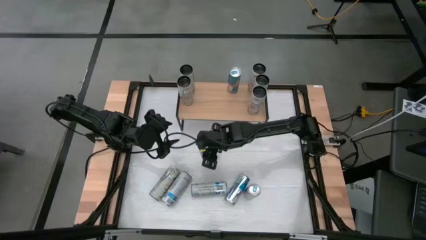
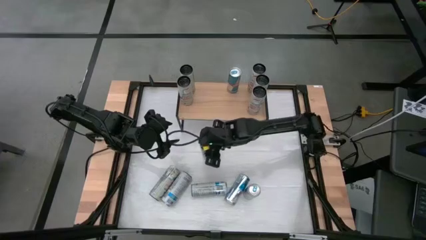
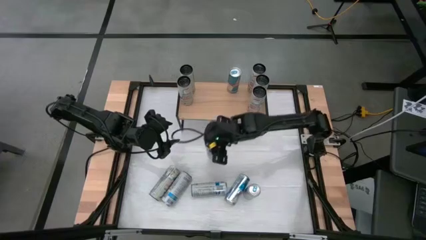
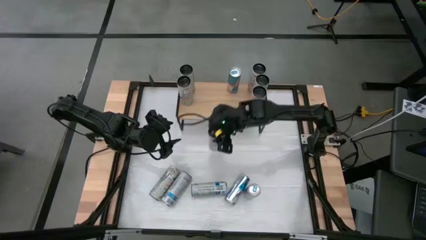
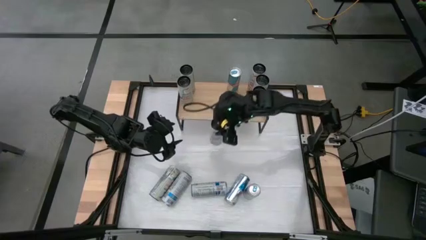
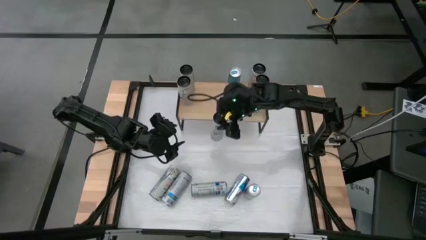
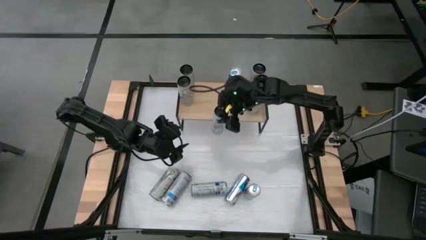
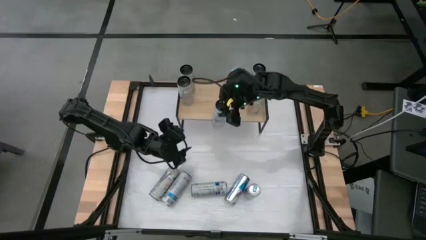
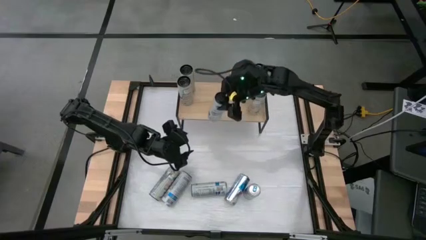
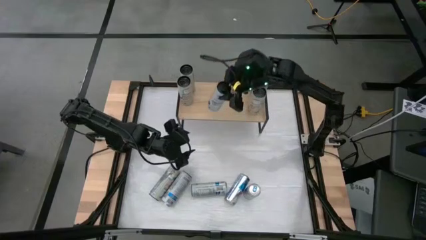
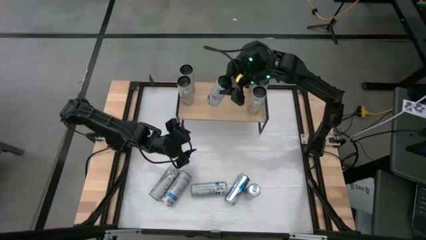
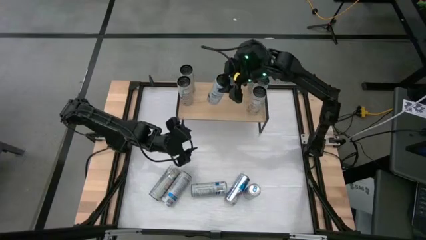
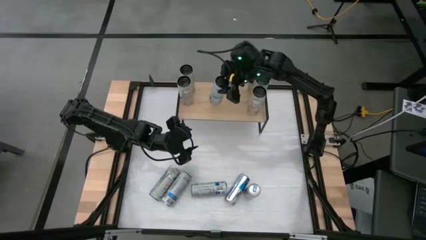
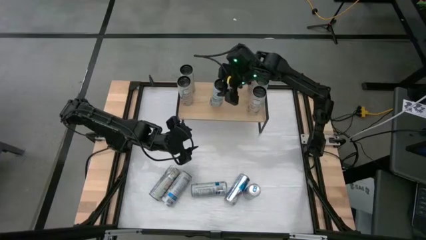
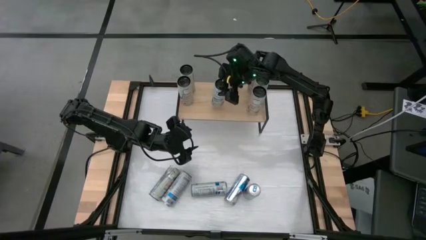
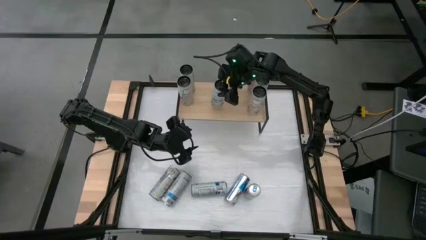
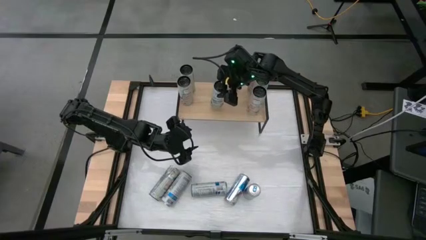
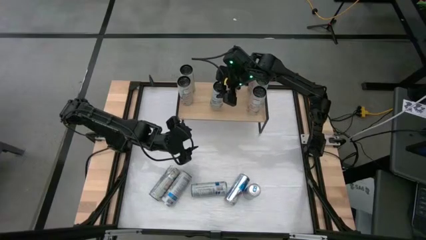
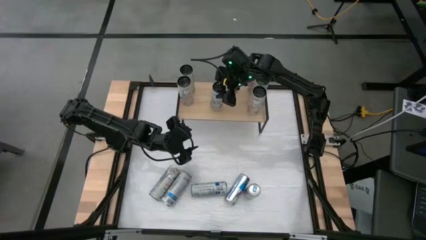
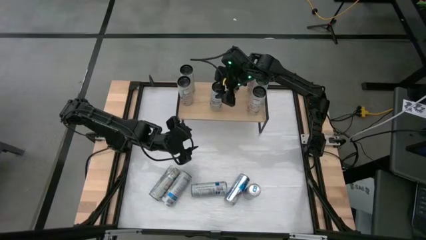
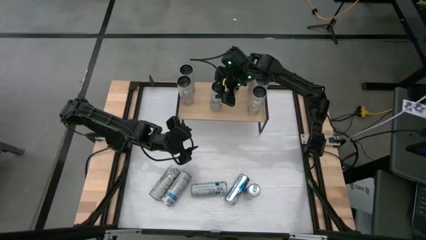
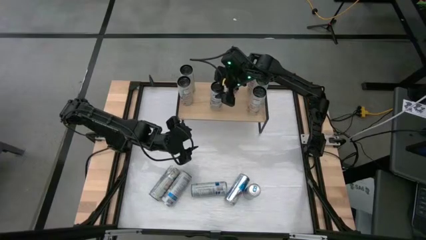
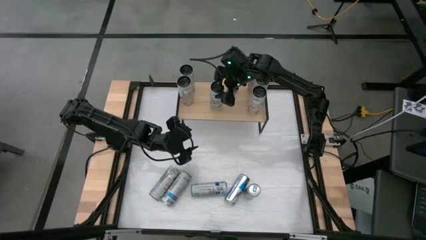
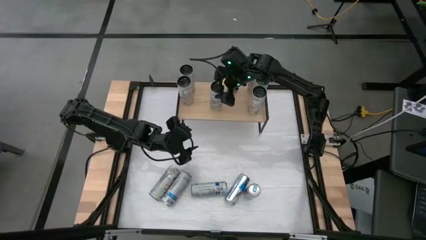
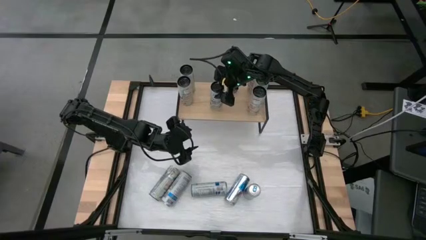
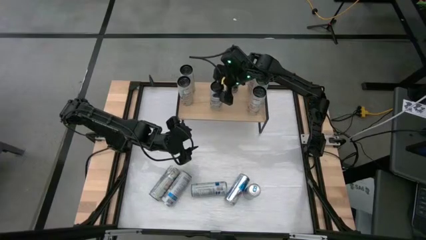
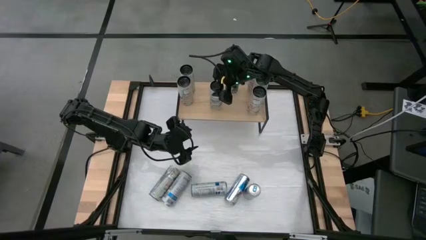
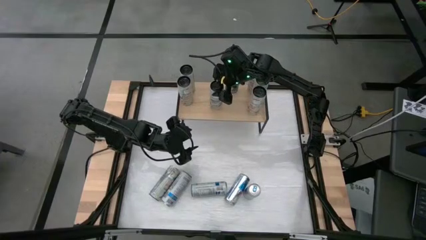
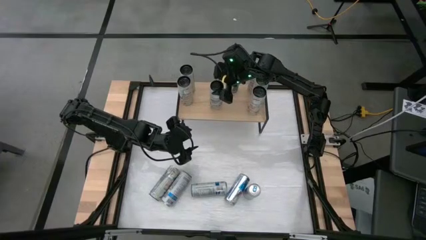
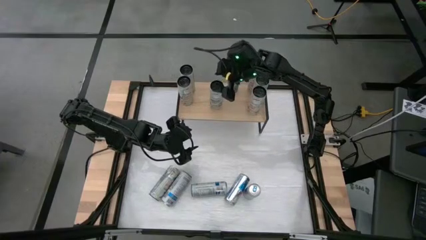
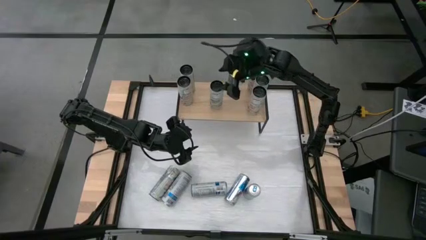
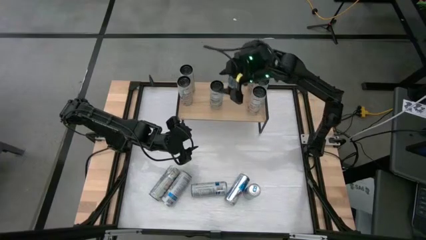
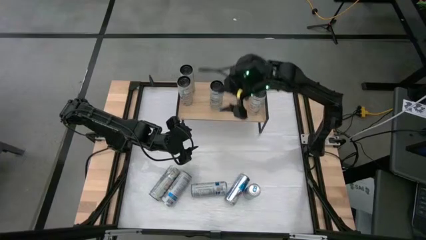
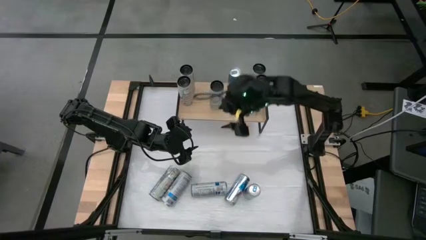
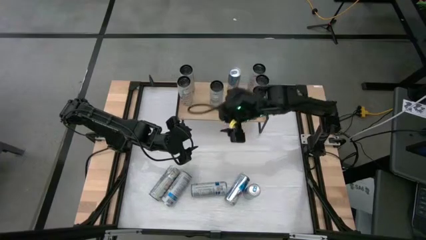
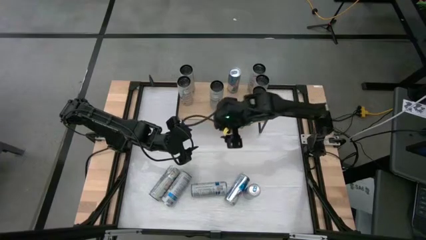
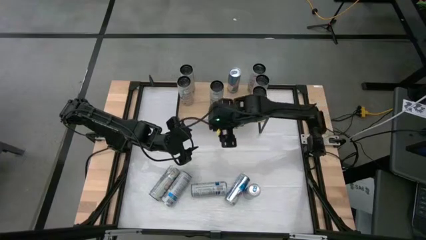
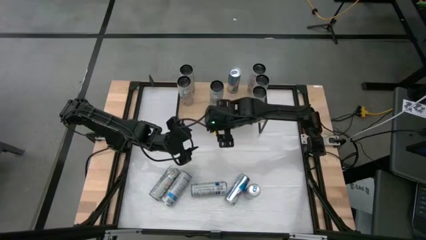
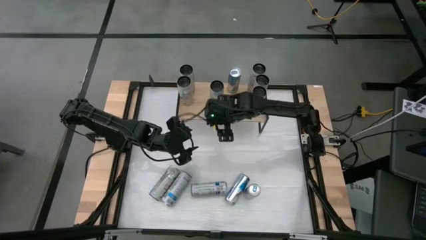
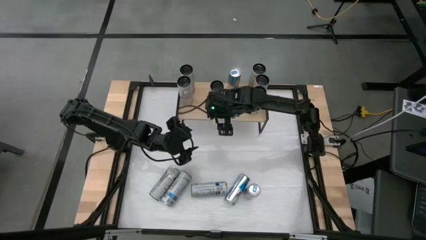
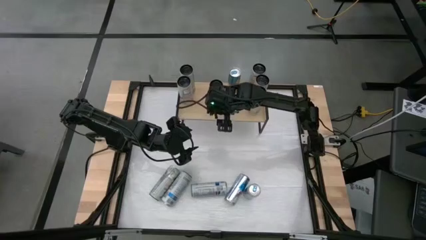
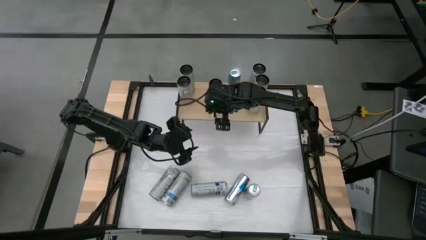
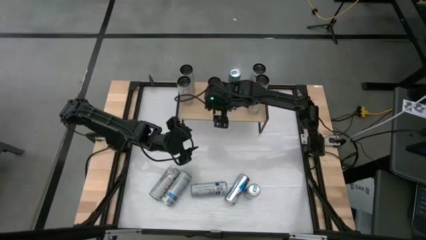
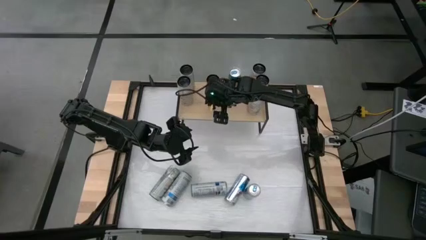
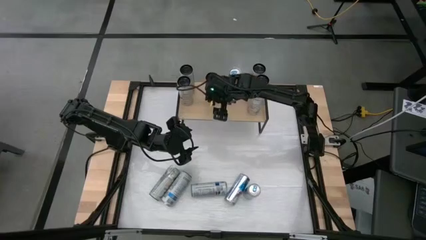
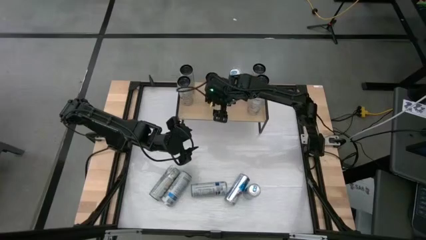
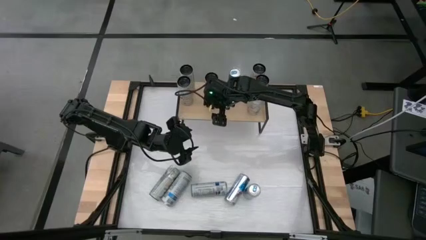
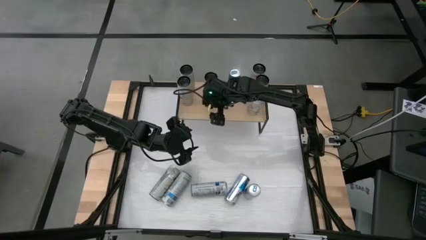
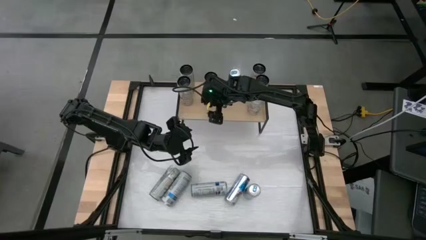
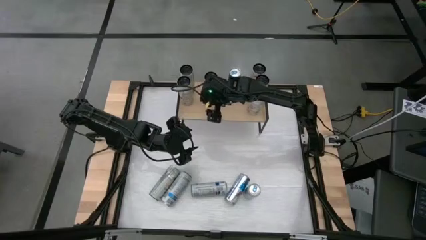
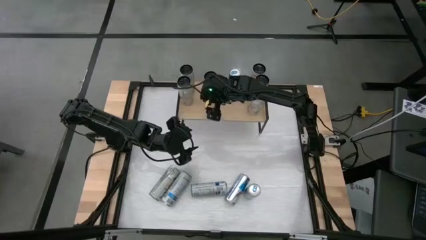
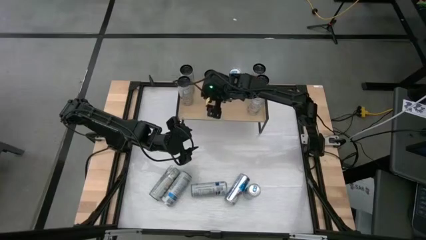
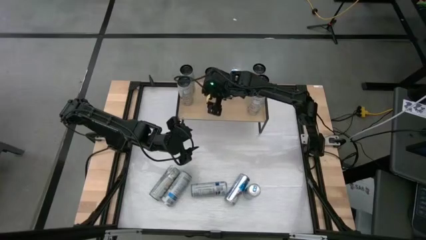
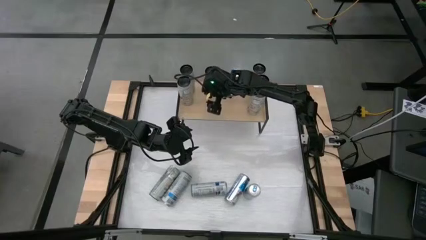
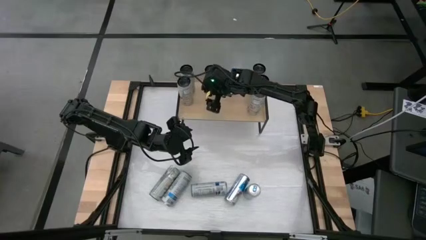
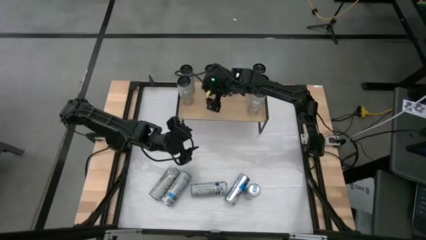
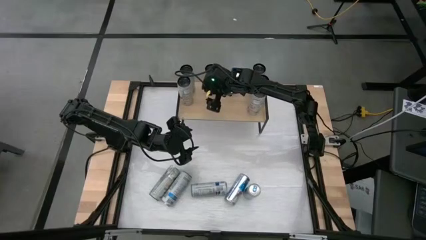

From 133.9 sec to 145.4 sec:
Task: Sort soda cans
Put the bottom white blue soda can on the shelf

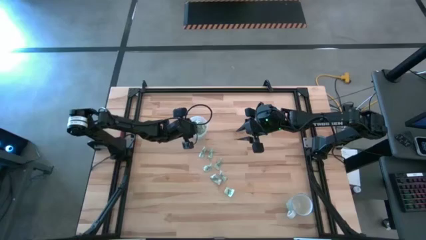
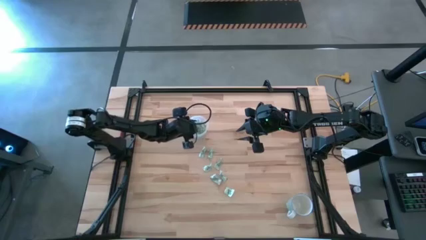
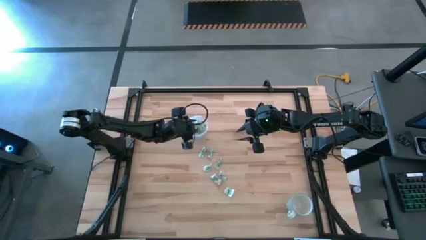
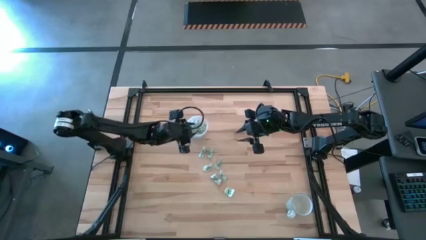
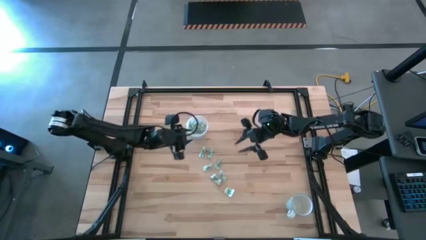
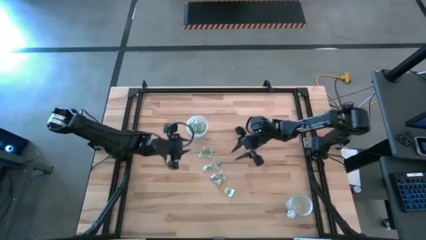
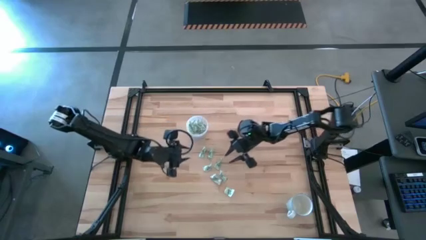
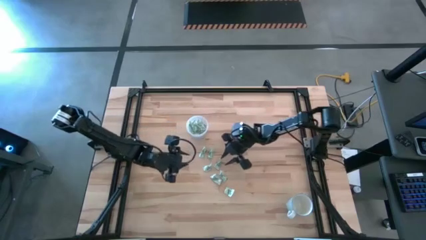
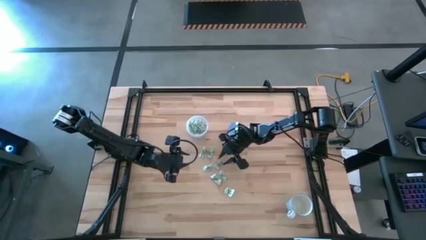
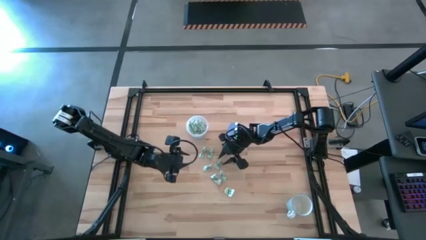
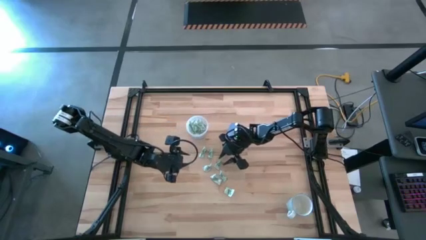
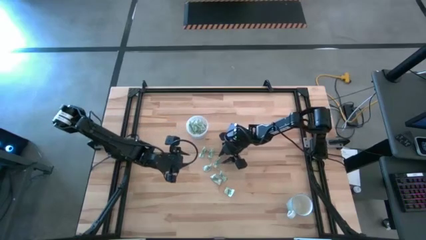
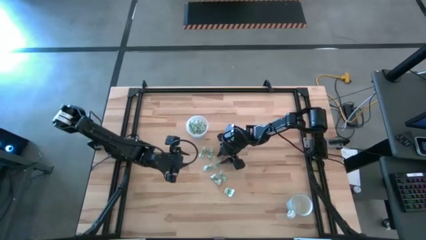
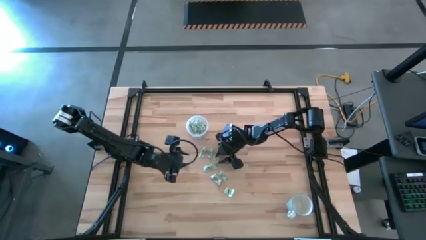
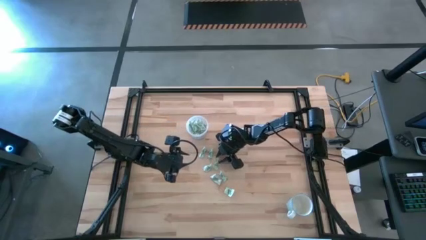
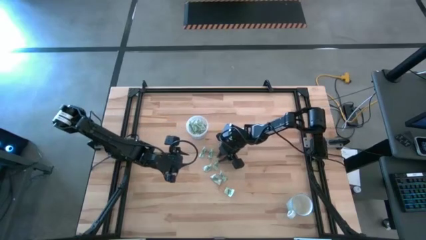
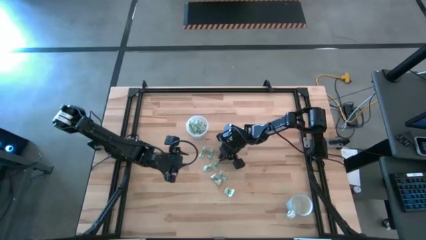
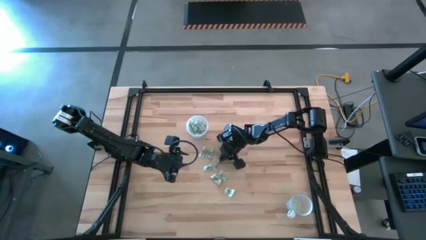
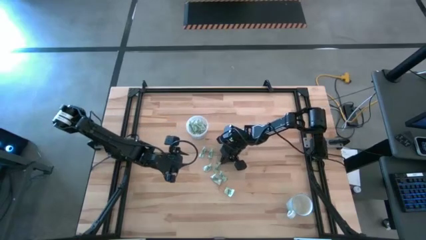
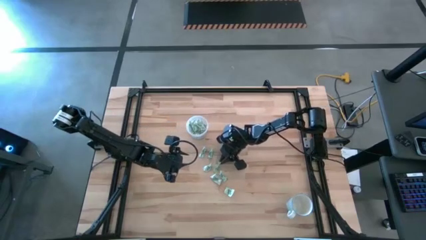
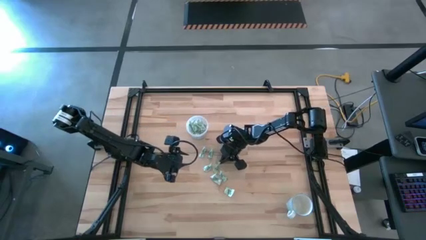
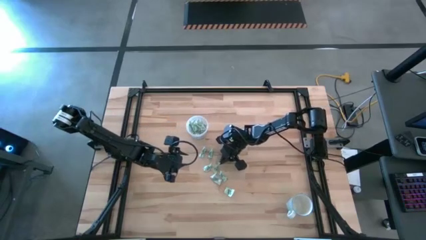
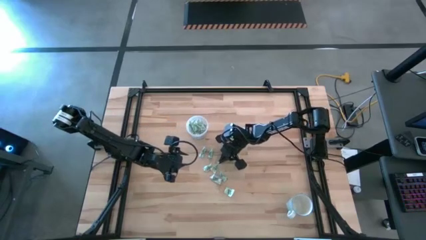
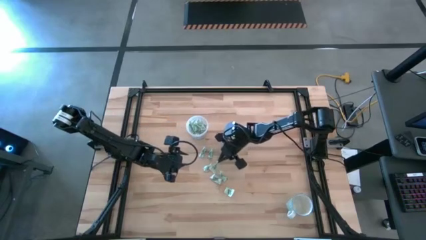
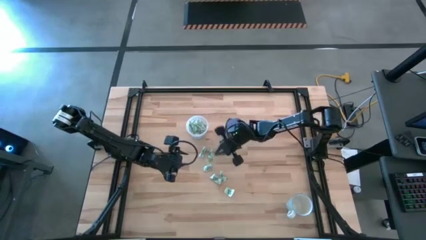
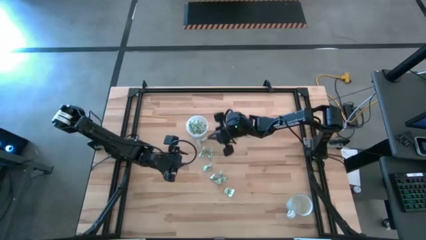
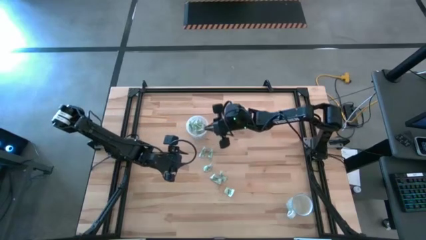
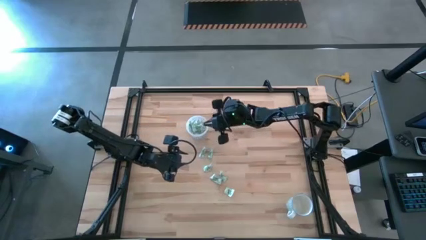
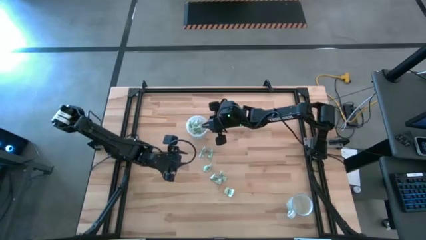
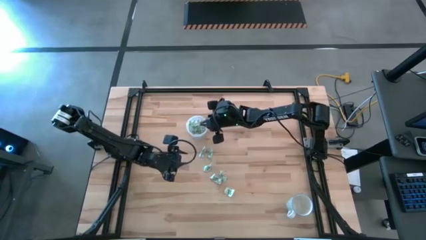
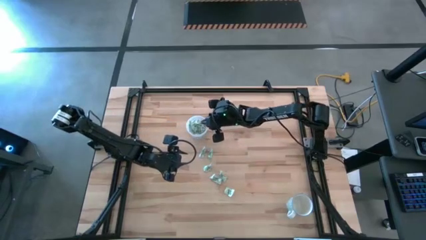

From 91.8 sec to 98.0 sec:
Task: Pick and place Stevia / Truvia into bins
Put the stevia packet into the transparent container
